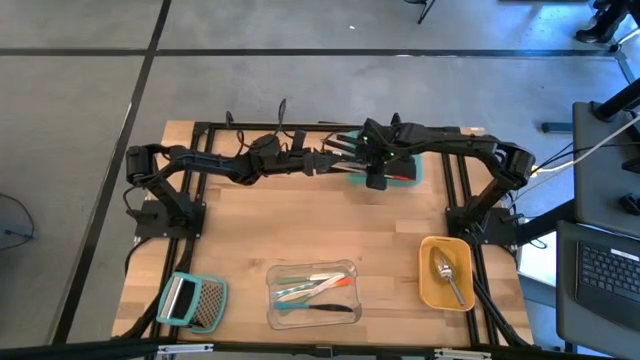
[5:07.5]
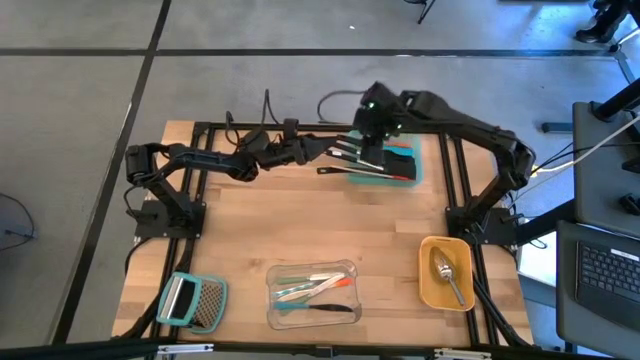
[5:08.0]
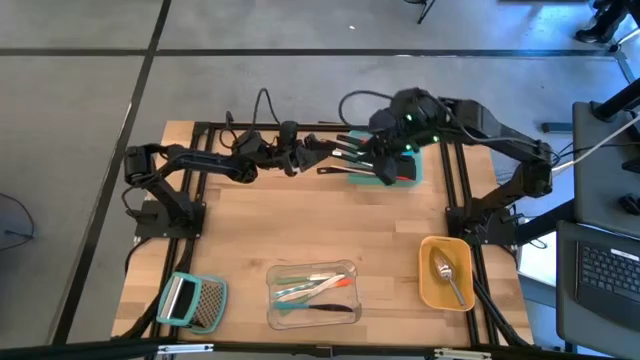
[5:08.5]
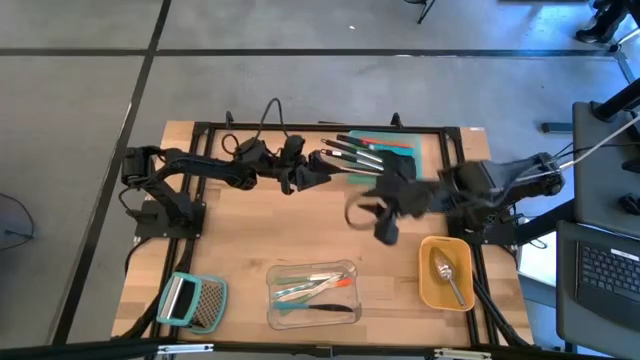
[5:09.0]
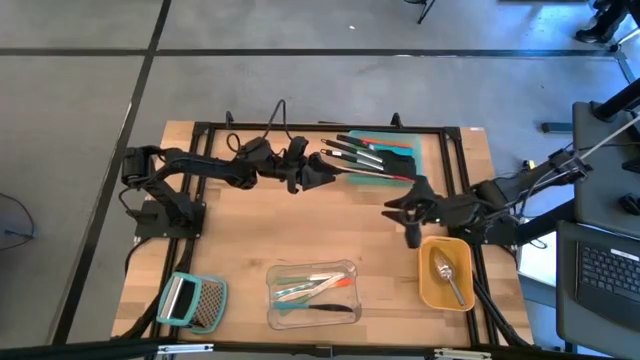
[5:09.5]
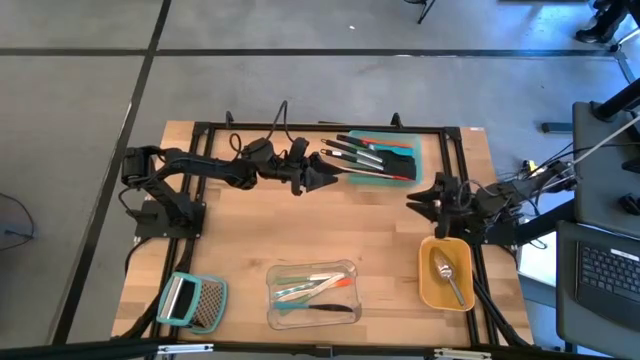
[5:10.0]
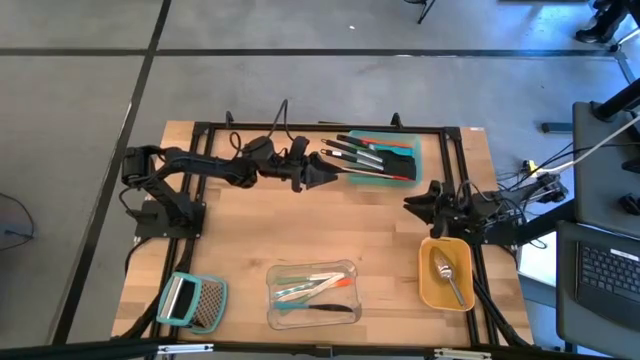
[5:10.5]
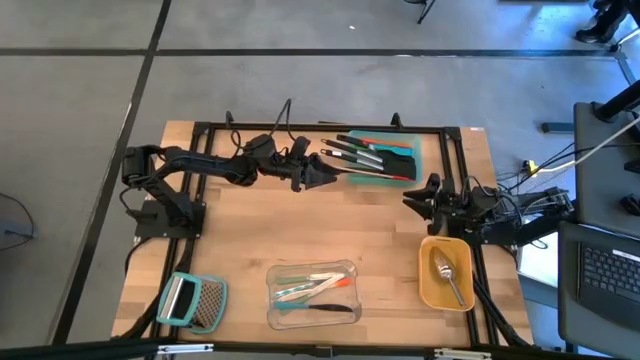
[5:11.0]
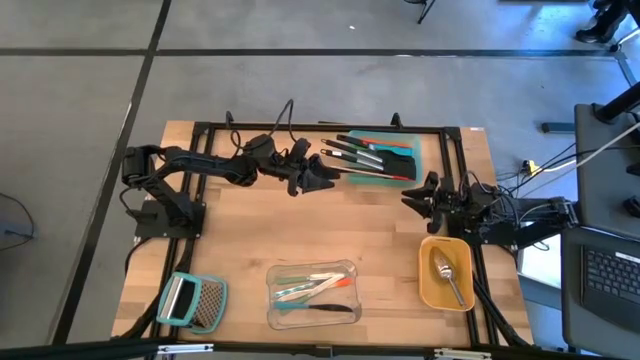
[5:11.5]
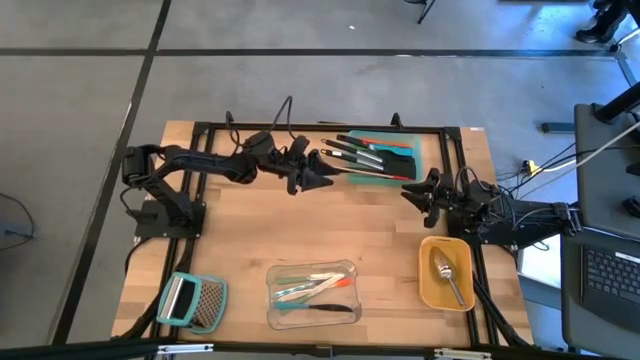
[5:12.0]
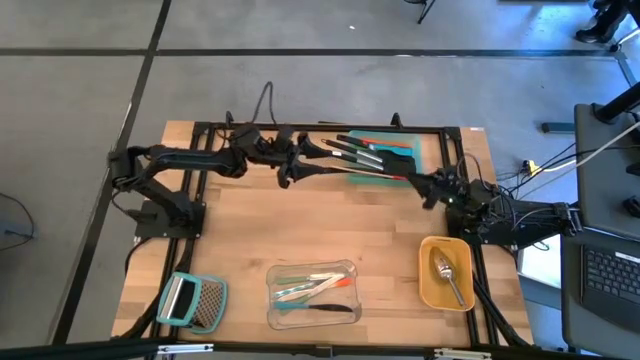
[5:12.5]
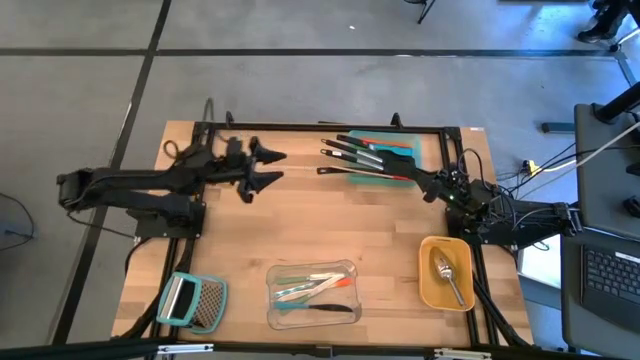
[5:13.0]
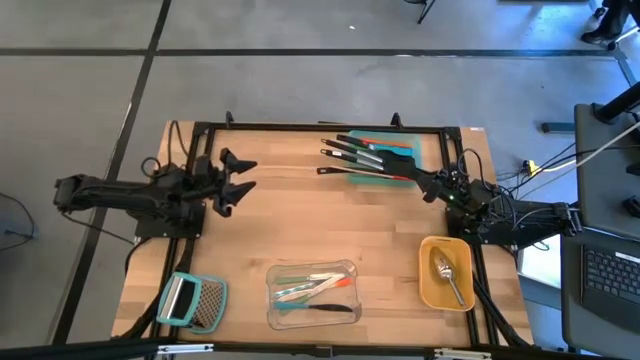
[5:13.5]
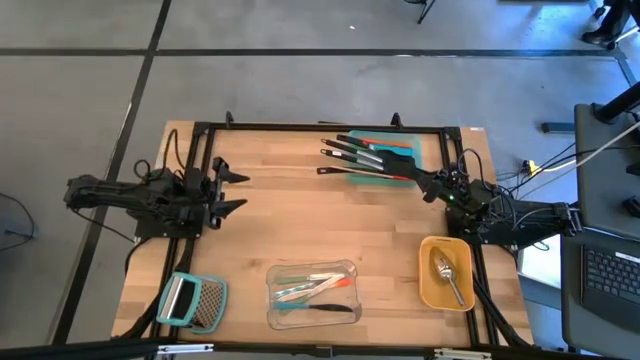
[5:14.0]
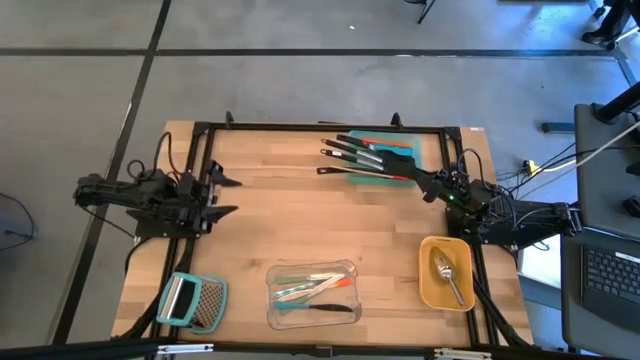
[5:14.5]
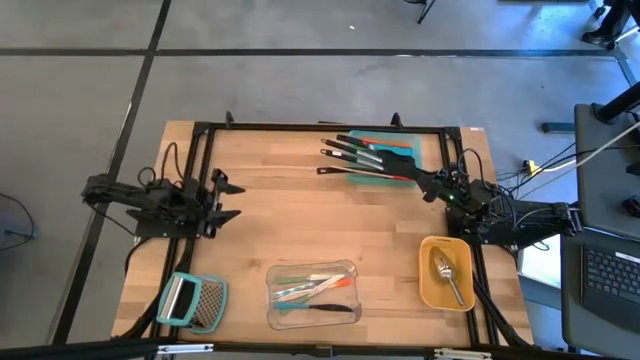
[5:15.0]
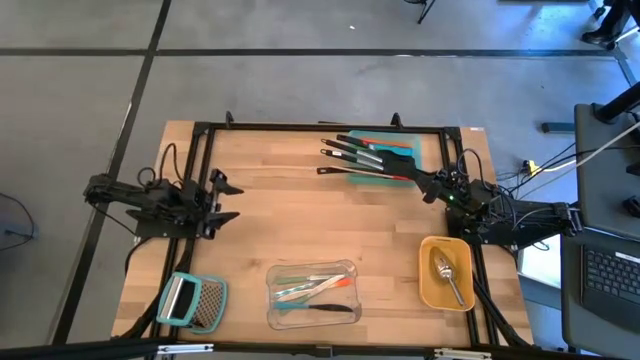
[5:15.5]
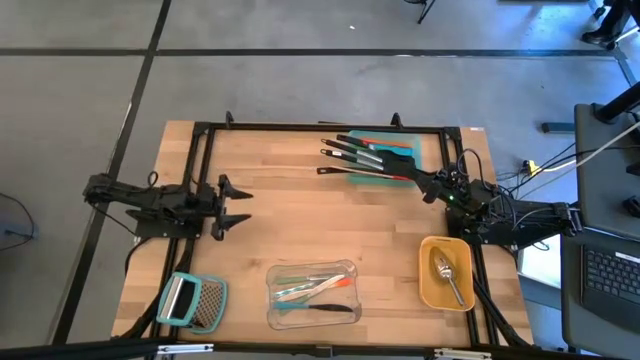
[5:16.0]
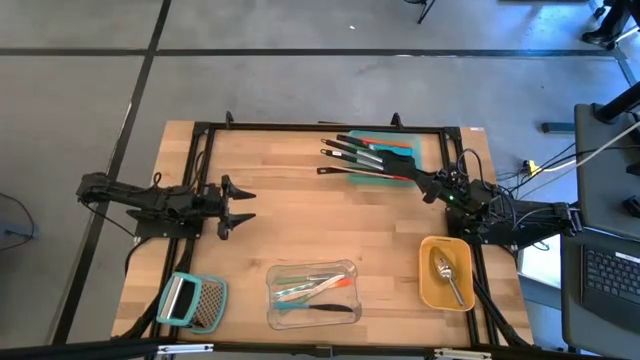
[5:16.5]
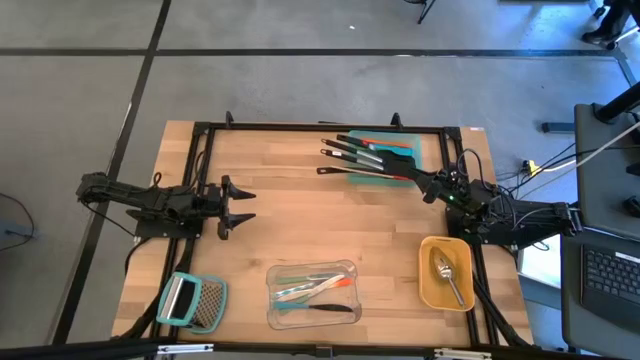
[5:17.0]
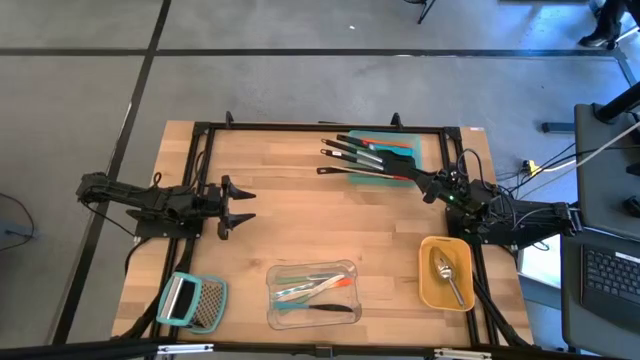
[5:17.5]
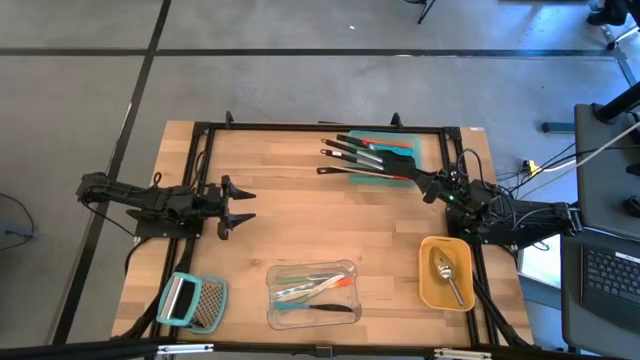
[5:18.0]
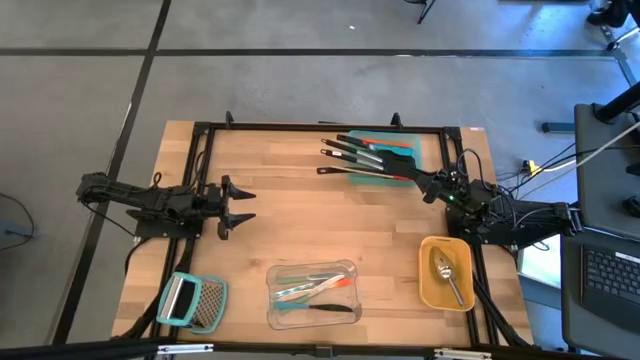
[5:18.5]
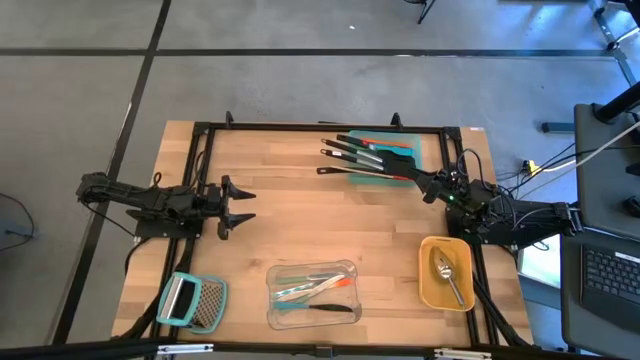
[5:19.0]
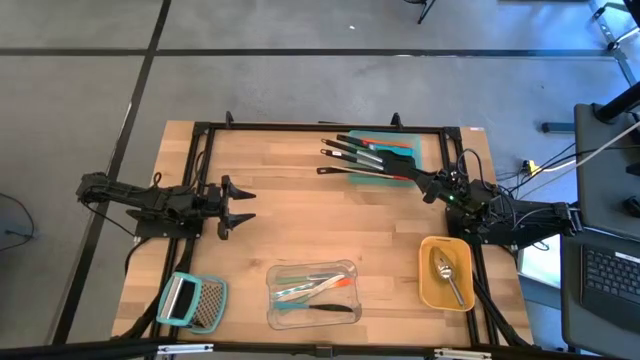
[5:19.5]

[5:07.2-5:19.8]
Task: Pick & Place Kitchen Items
Return to Home Position

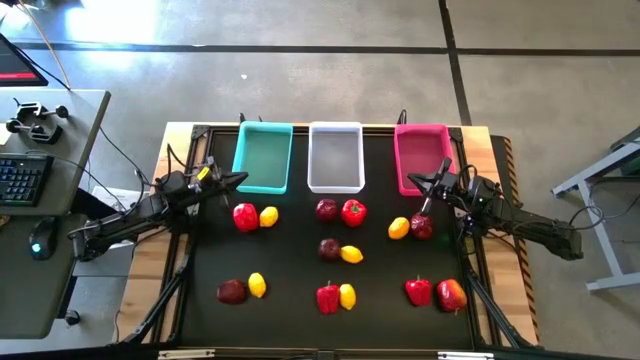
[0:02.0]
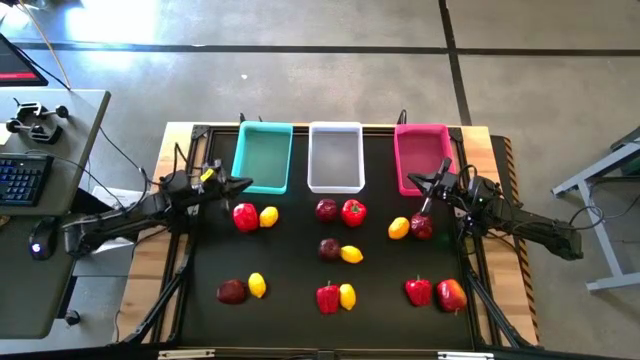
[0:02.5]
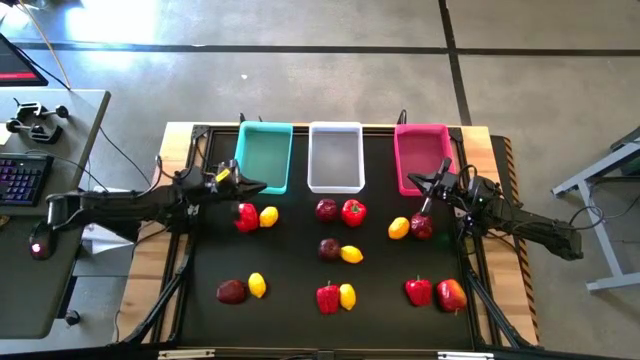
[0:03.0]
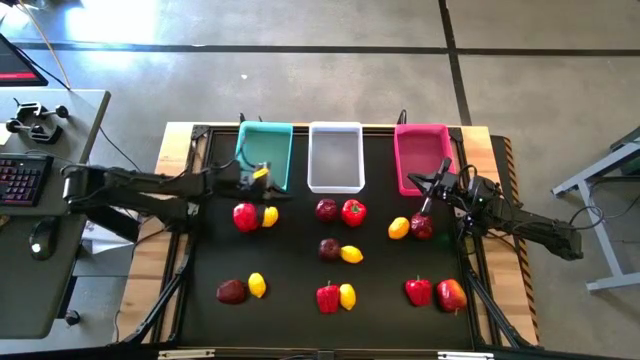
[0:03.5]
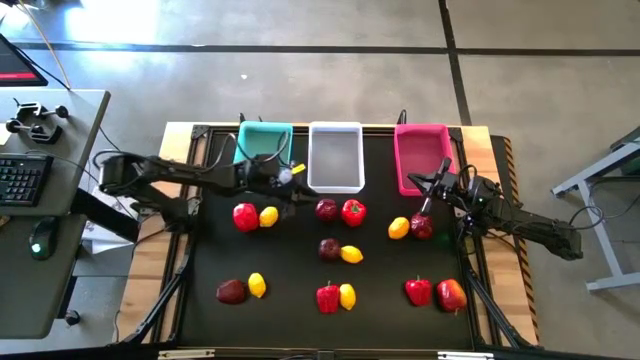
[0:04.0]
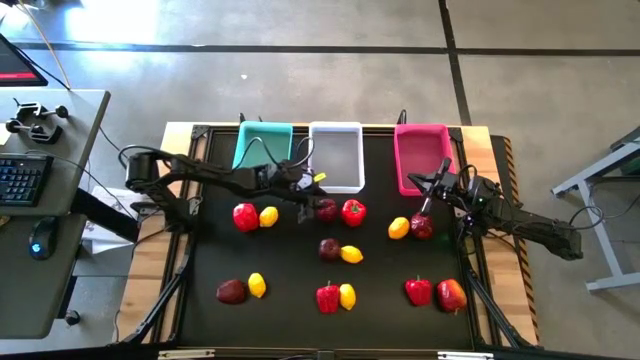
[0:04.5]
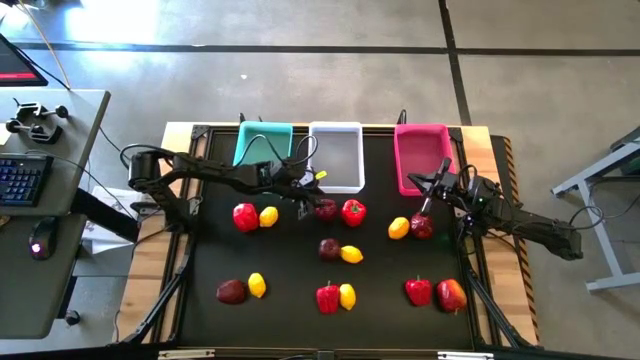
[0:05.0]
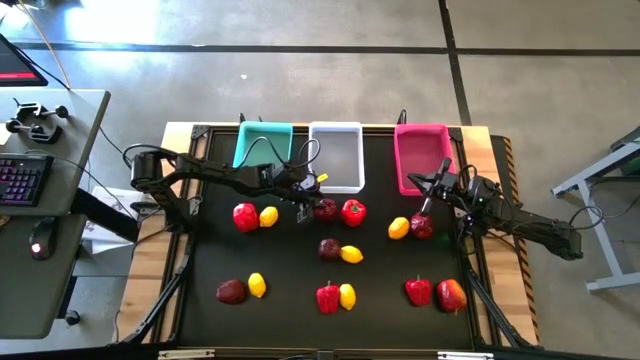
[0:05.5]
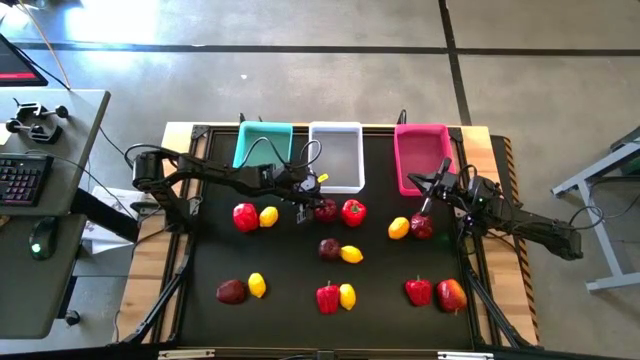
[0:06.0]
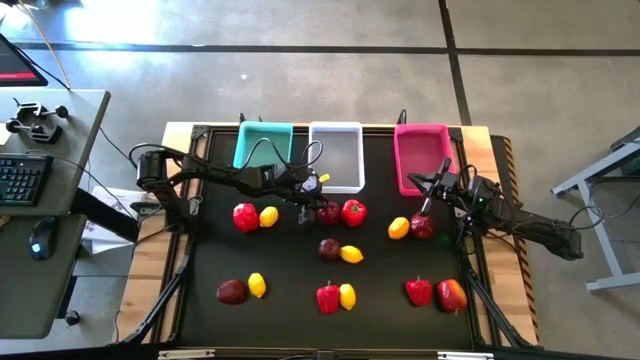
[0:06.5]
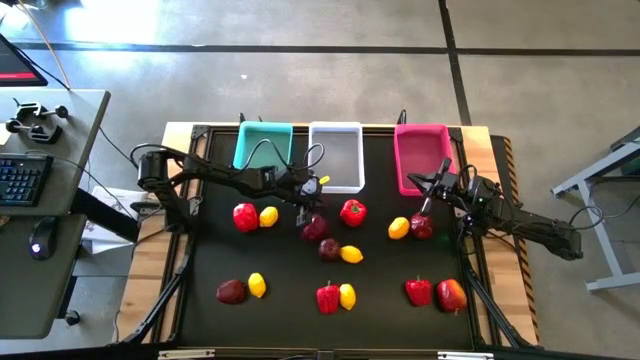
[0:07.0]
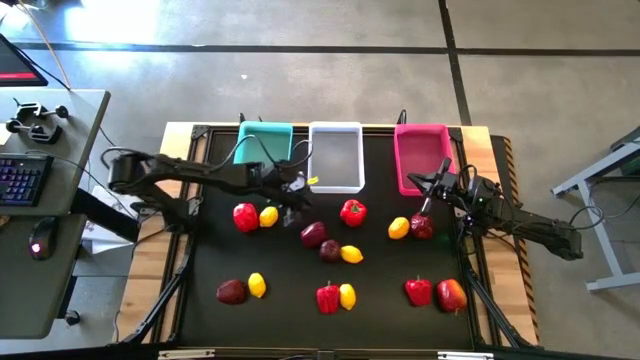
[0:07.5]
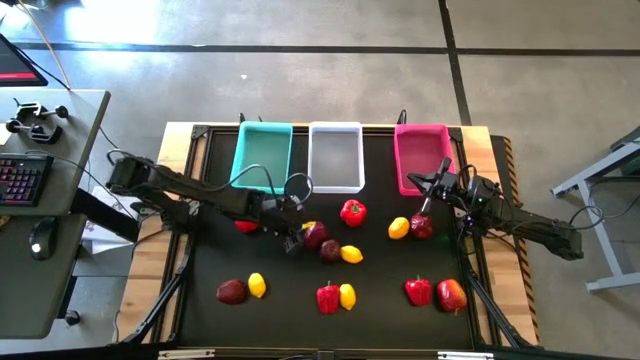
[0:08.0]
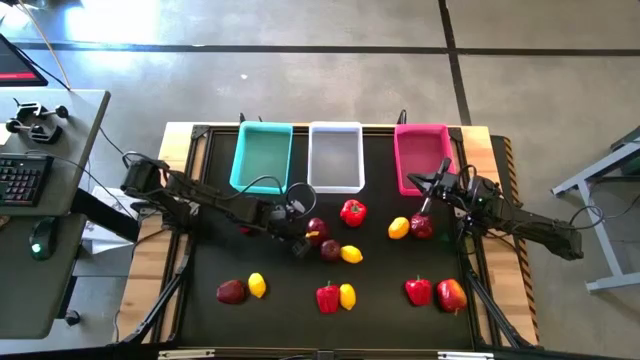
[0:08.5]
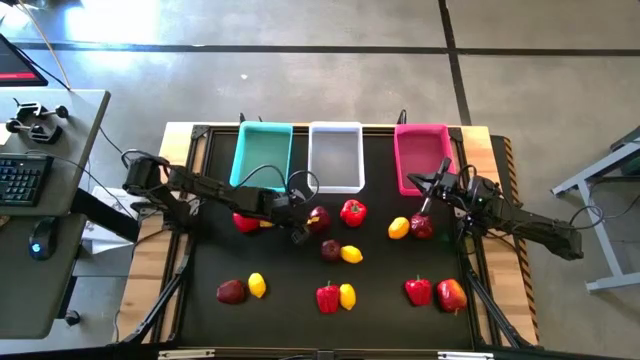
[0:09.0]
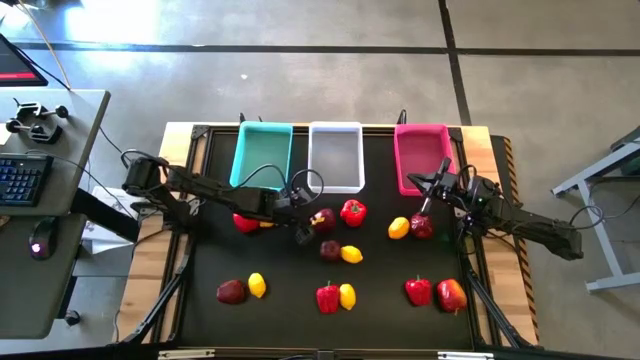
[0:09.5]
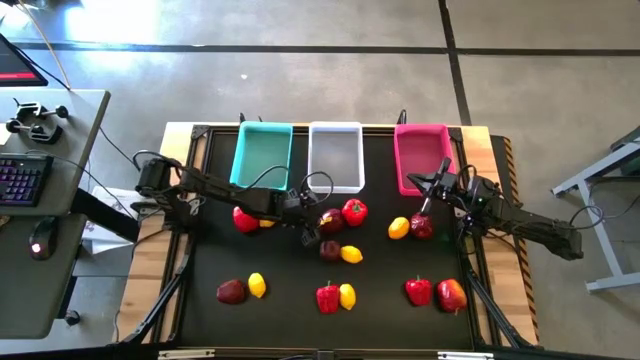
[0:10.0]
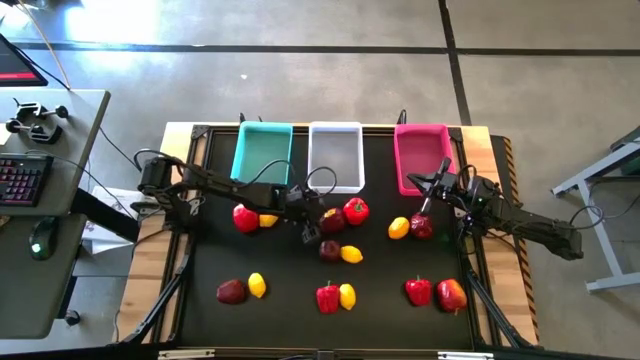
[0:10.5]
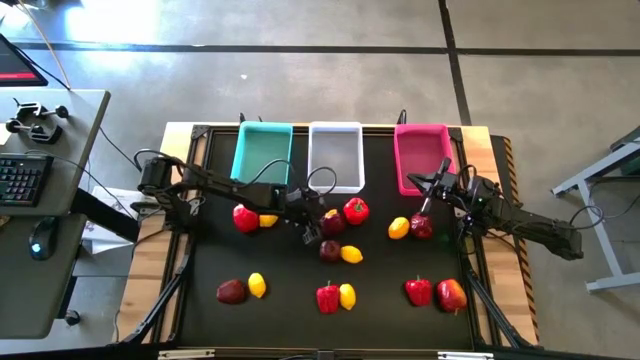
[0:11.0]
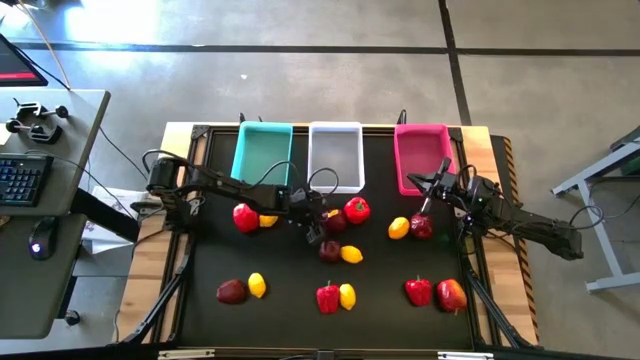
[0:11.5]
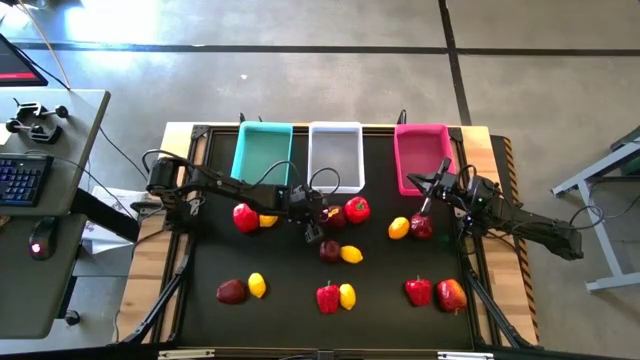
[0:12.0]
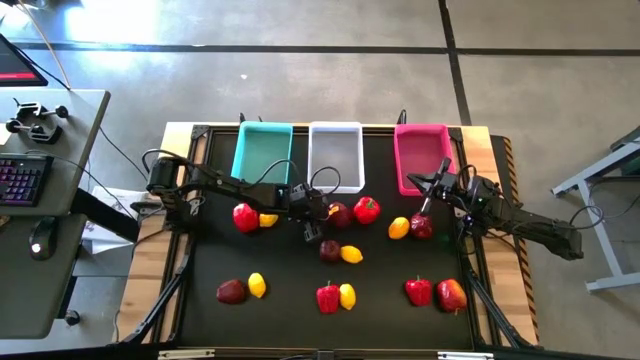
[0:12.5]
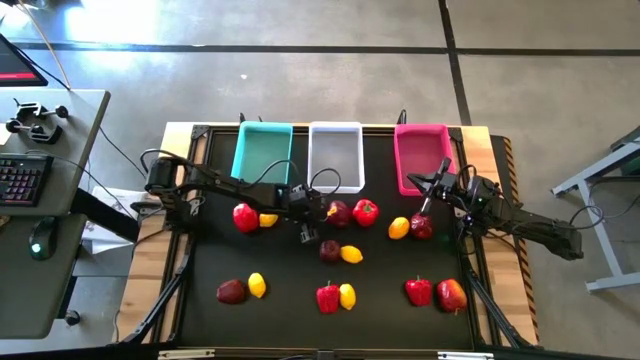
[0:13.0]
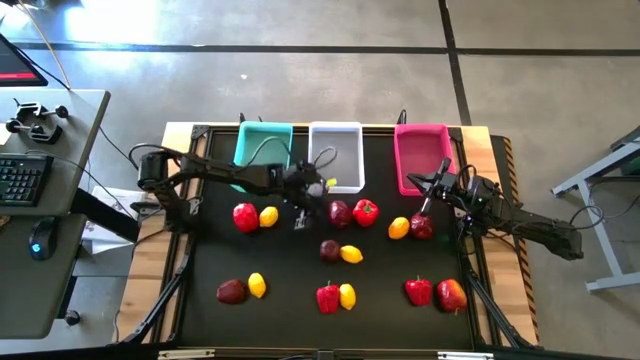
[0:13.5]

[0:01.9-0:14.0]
Task: Sort produce into baskets
Put the apple into the white bin
